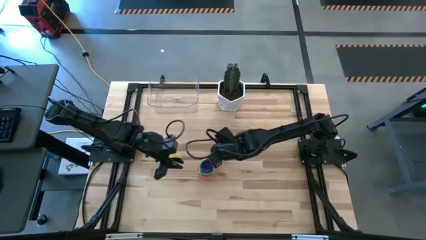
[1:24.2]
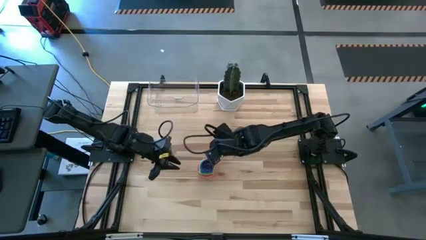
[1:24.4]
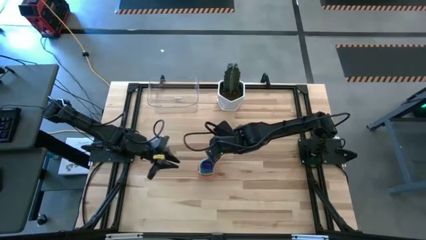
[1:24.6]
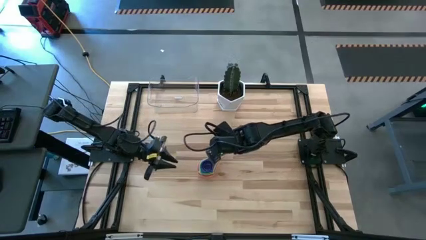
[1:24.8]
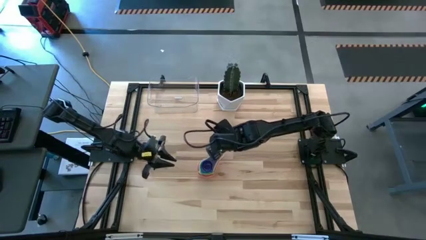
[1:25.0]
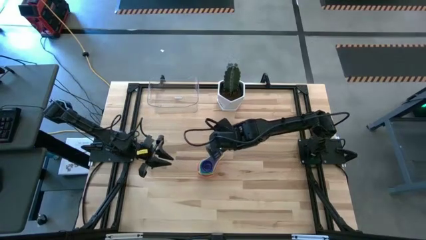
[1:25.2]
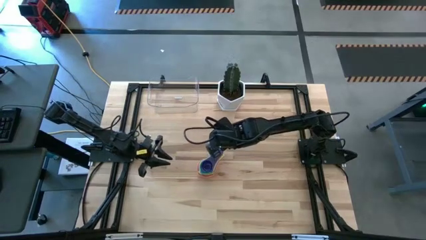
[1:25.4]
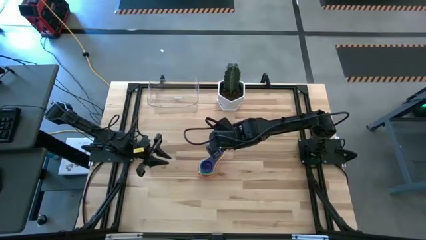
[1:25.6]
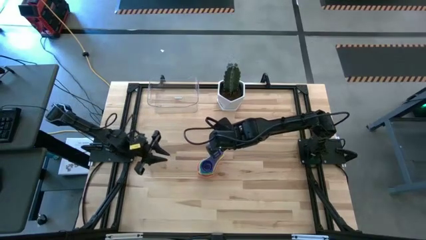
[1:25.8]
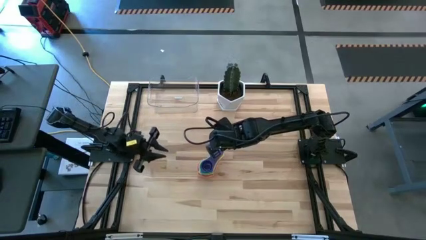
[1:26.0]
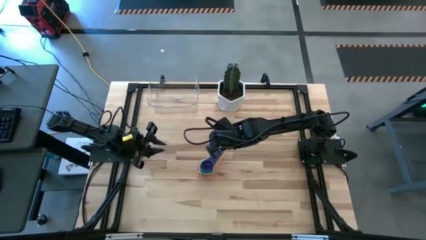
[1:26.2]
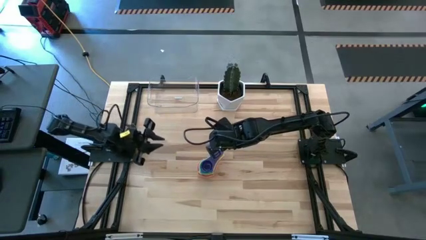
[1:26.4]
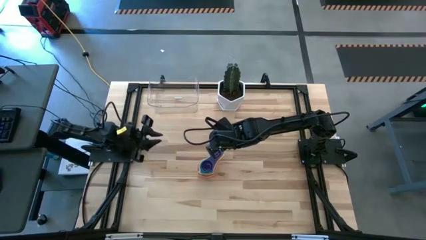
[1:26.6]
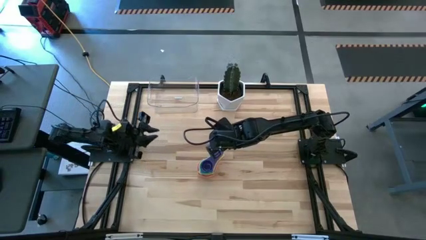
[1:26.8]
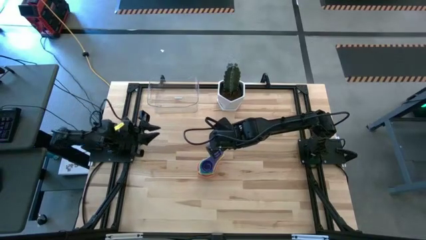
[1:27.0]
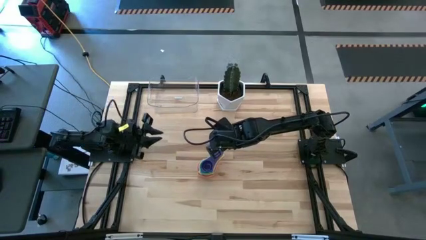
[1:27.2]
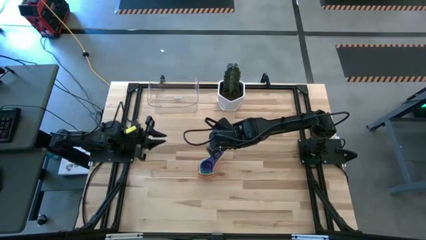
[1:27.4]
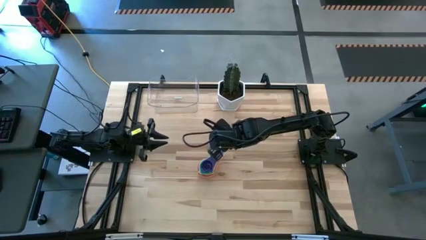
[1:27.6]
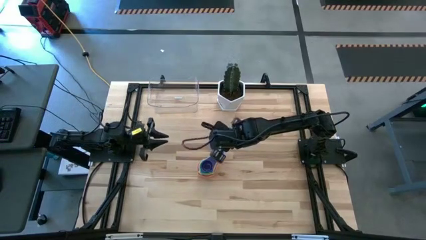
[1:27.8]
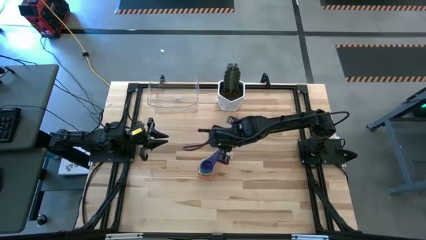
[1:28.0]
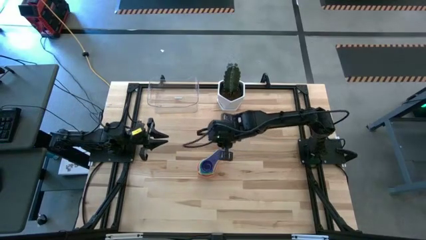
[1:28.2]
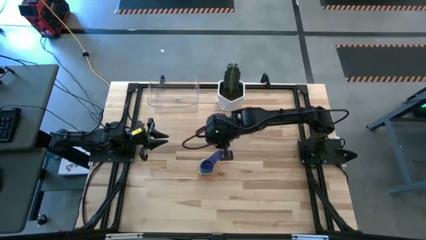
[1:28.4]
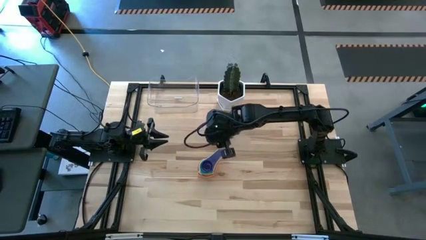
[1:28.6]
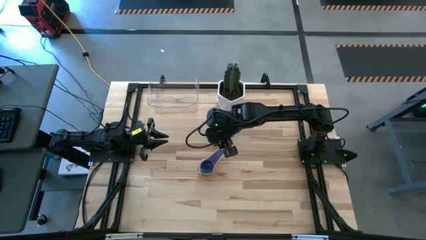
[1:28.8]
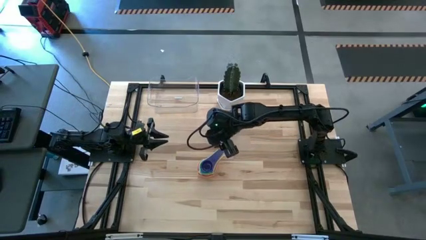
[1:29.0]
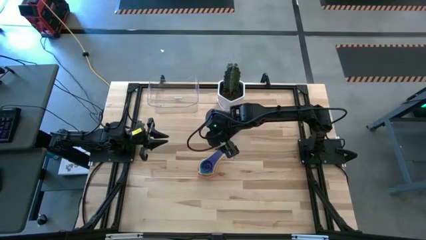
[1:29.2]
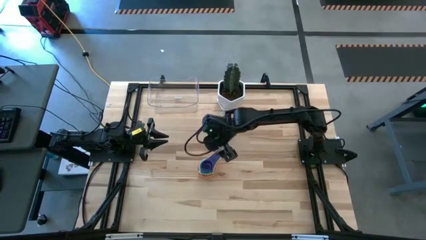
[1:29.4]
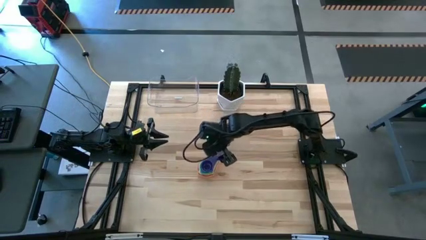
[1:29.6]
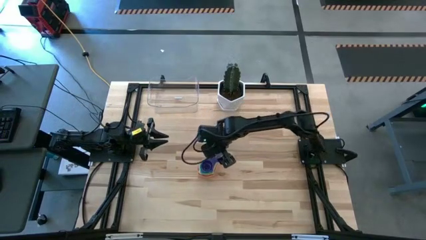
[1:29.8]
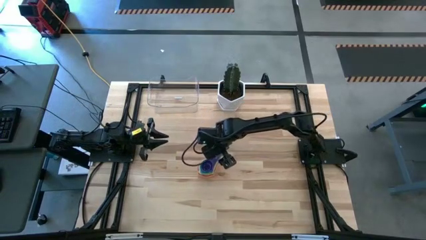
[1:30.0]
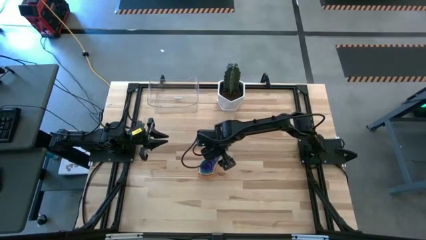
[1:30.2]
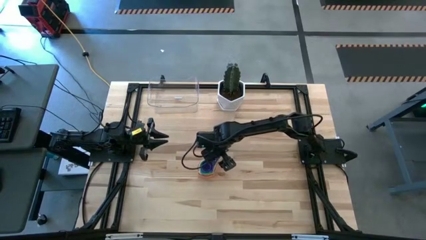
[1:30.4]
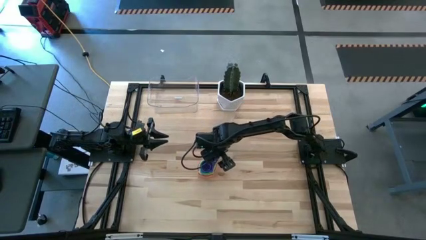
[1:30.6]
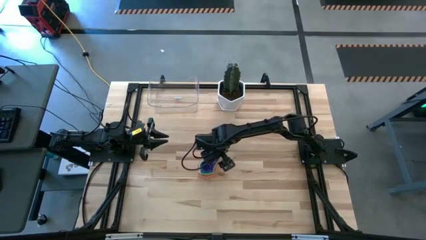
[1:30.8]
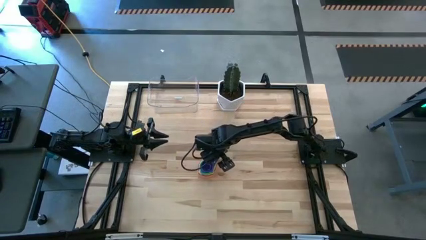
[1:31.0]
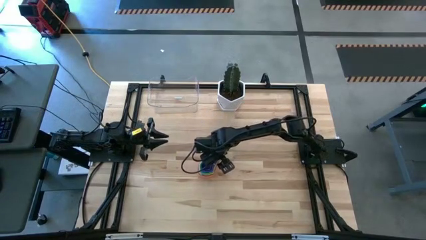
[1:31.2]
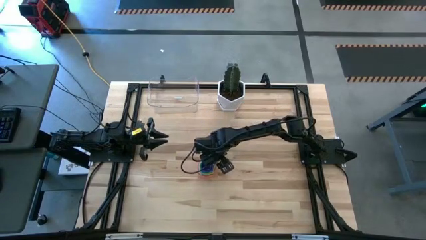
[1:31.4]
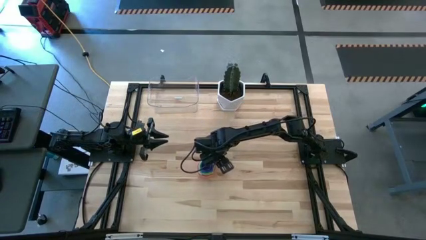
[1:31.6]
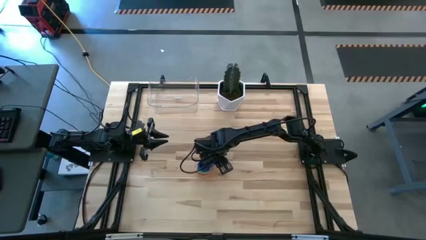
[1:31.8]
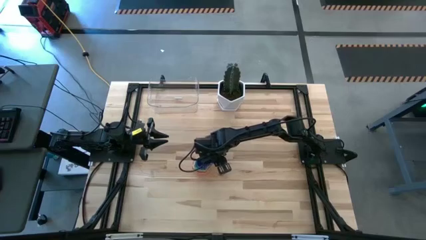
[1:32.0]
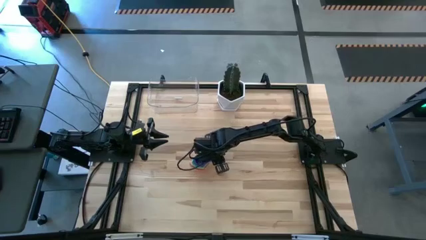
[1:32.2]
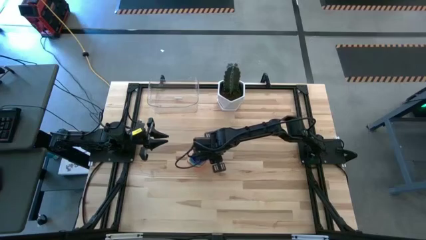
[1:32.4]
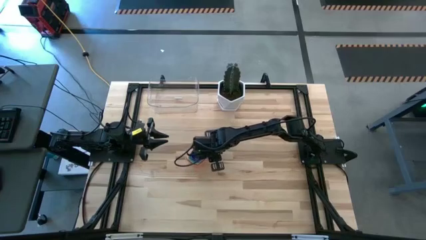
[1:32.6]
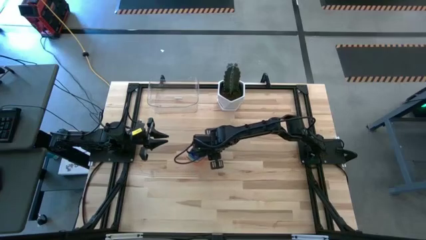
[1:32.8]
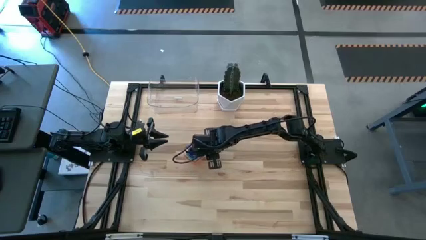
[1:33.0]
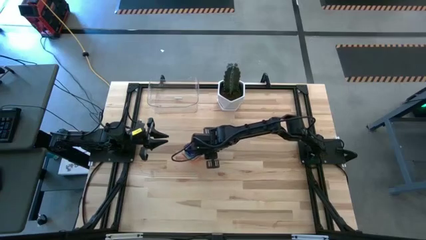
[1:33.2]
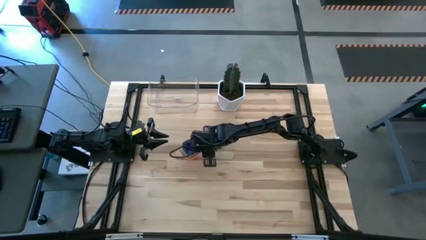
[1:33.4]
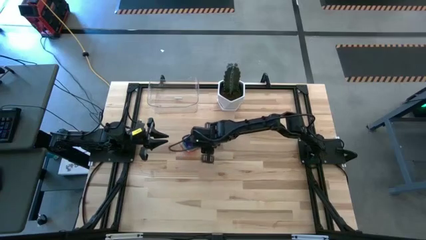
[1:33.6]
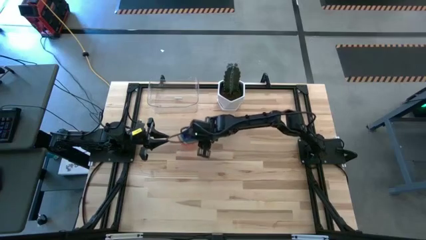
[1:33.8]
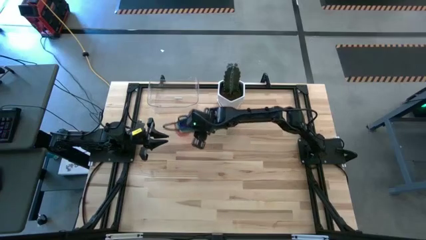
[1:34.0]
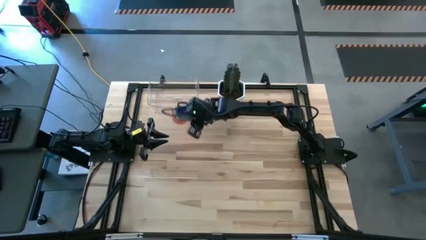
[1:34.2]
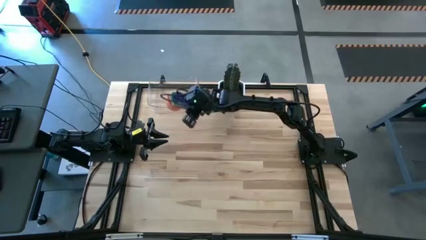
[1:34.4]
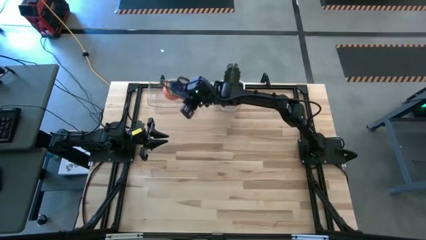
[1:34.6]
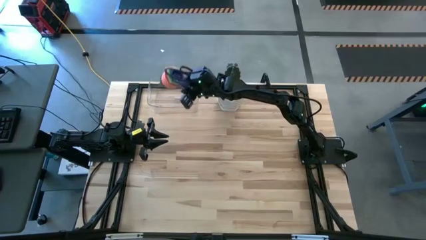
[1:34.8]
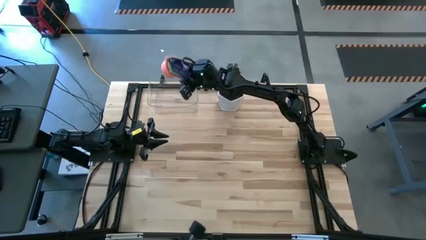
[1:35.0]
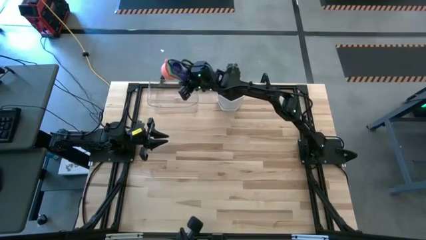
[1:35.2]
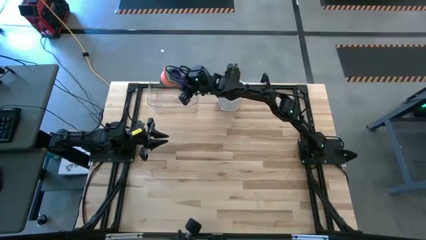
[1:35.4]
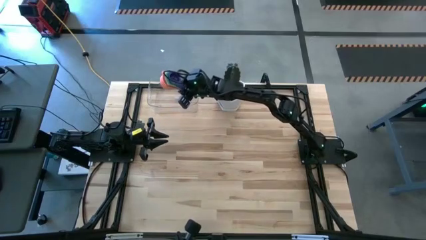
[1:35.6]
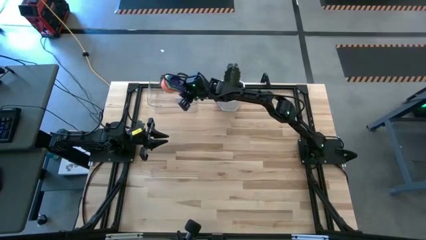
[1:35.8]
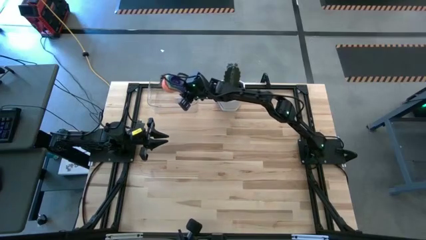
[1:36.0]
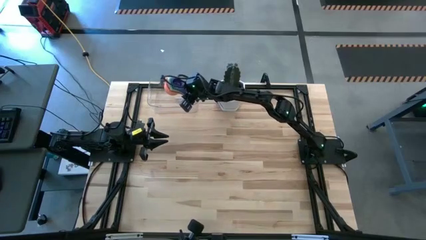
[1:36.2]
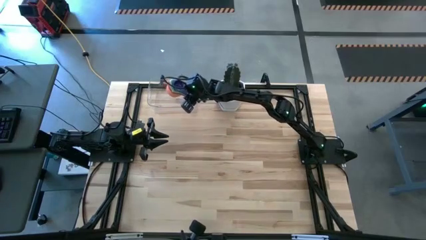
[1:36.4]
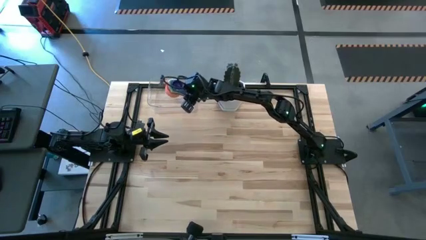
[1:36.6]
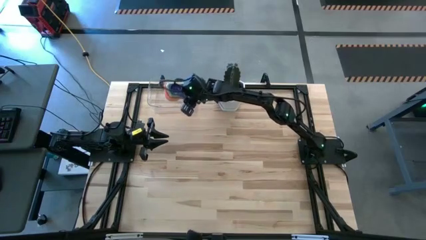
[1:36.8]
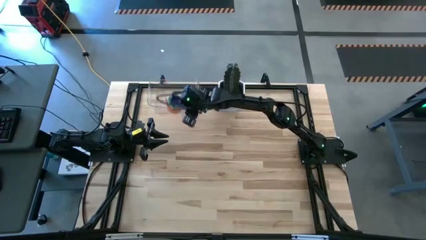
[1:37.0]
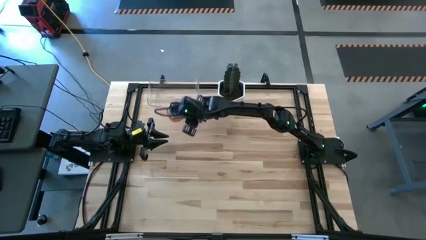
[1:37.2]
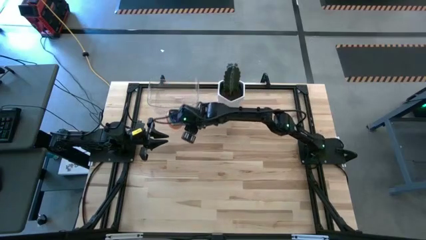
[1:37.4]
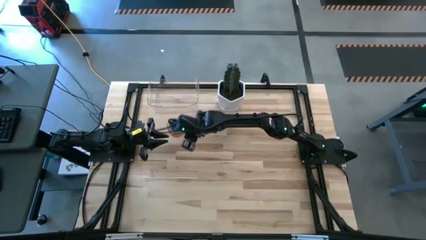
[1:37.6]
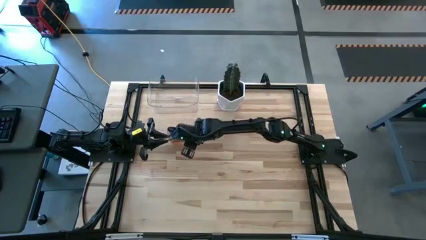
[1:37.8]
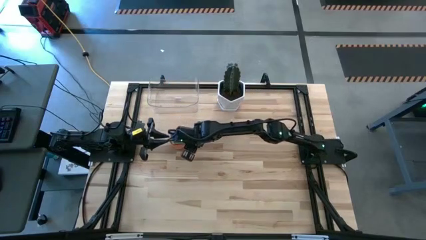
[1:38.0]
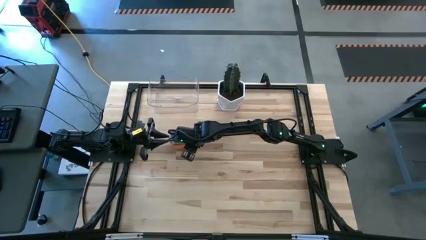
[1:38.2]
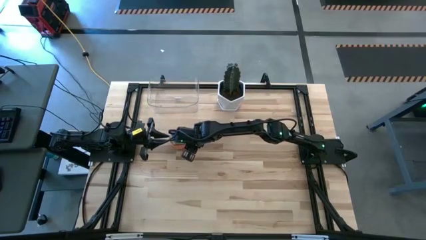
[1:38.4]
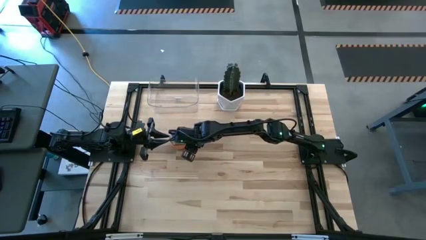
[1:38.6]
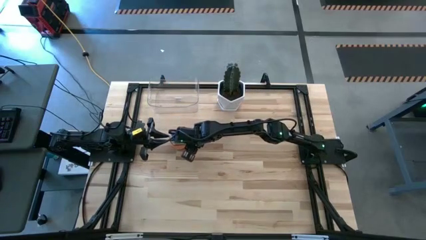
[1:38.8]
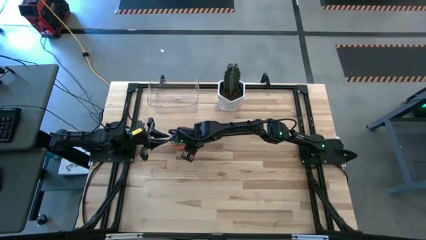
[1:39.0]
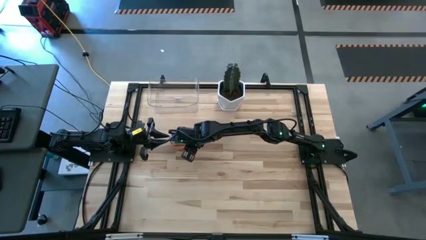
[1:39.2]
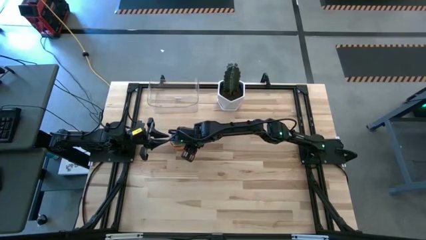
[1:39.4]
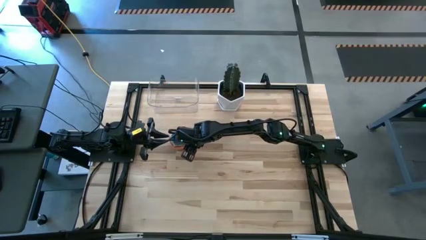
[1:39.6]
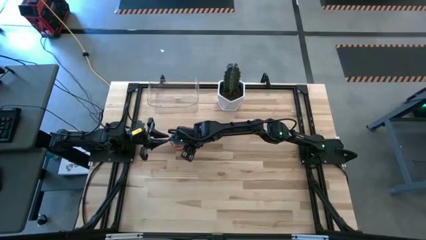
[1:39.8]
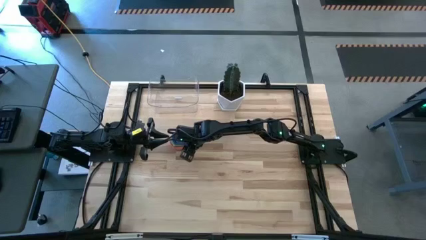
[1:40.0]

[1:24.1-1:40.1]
Task: Nest measuring cups in basket
Put the stacked measuring cups into the bin

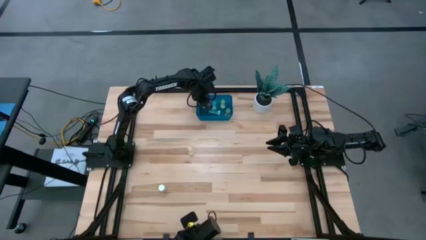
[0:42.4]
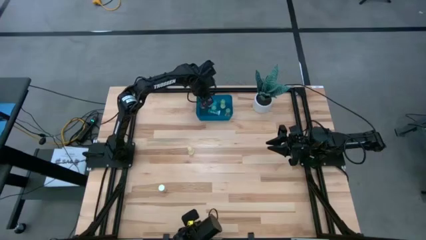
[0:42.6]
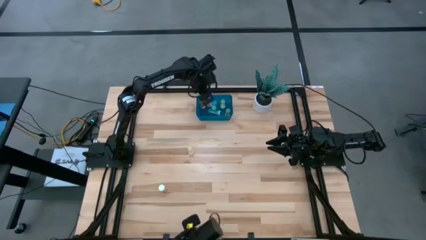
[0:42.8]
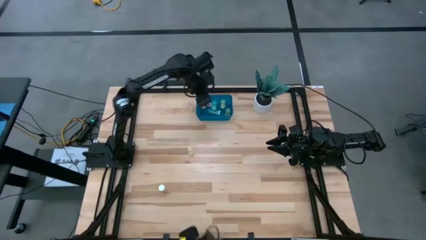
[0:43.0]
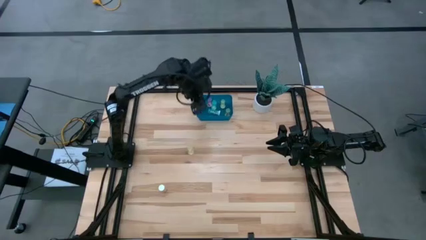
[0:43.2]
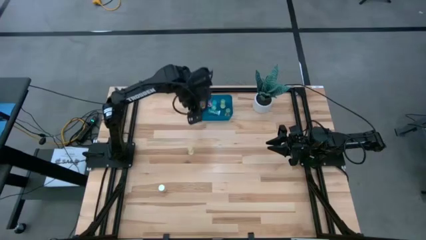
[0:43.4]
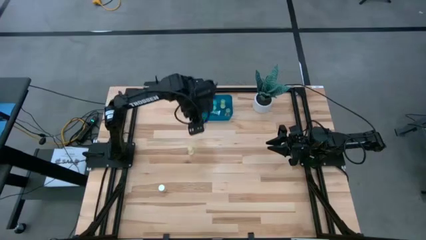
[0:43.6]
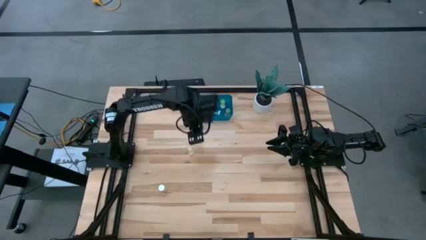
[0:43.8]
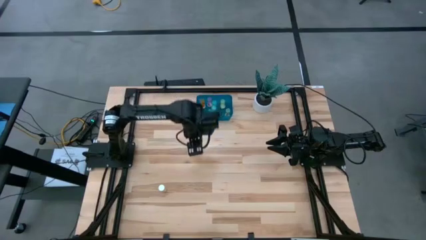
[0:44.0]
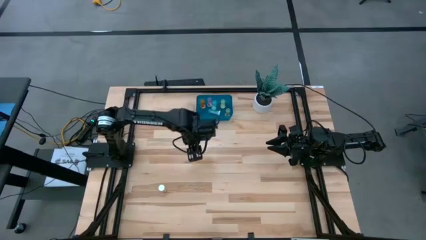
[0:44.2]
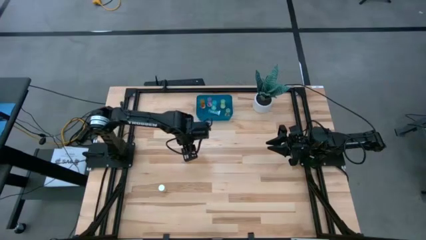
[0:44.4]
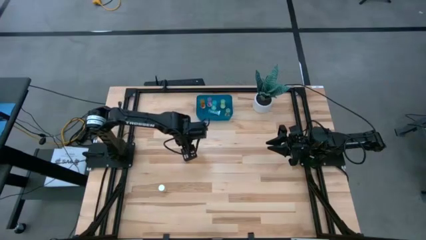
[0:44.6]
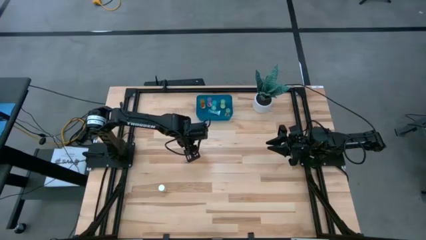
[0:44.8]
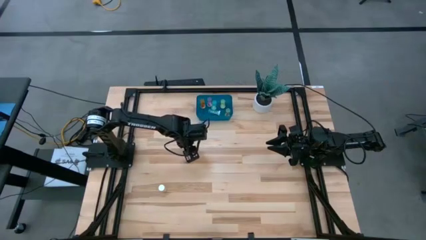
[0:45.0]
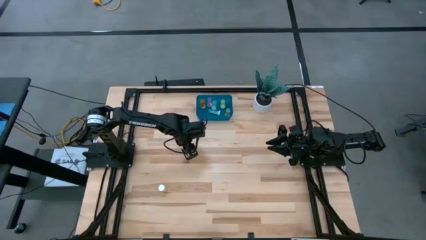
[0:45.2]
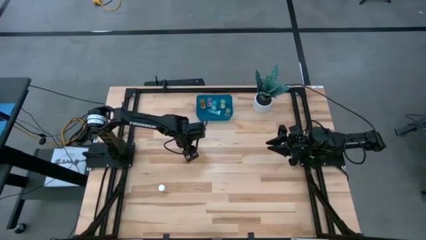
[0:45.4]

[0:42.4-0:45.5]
Task: Pick and place pill bottles into a basket
Put the yellow pill bottle into the blue bin
